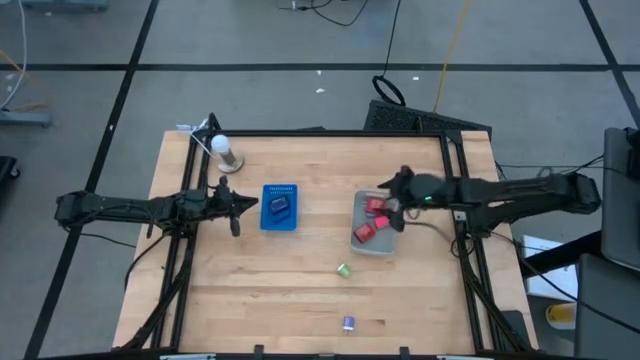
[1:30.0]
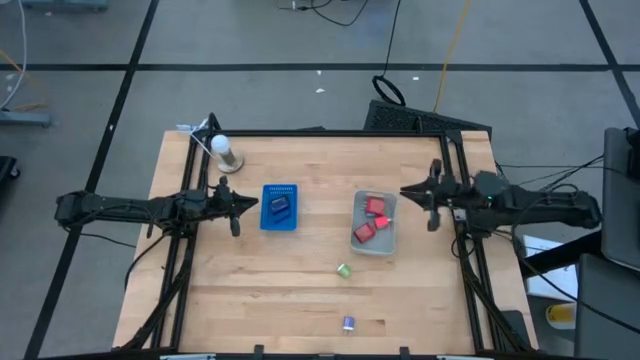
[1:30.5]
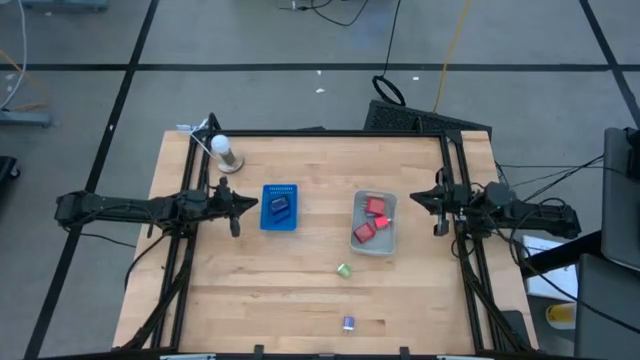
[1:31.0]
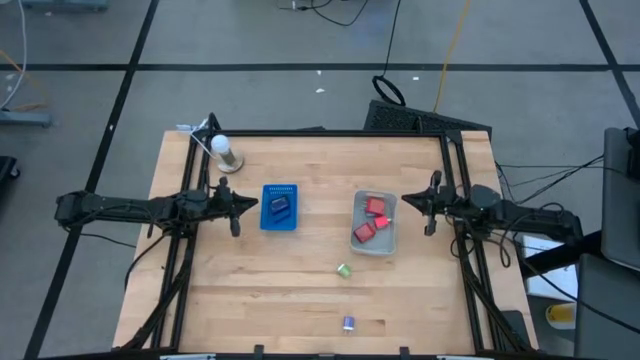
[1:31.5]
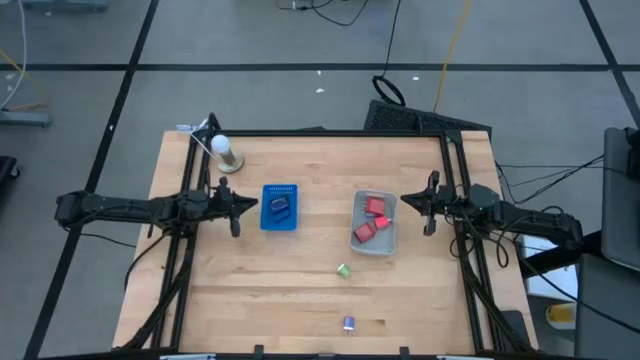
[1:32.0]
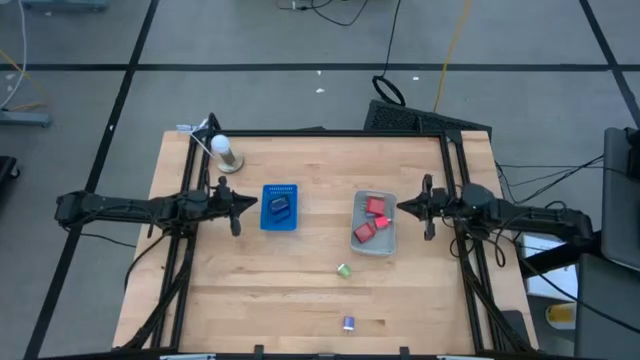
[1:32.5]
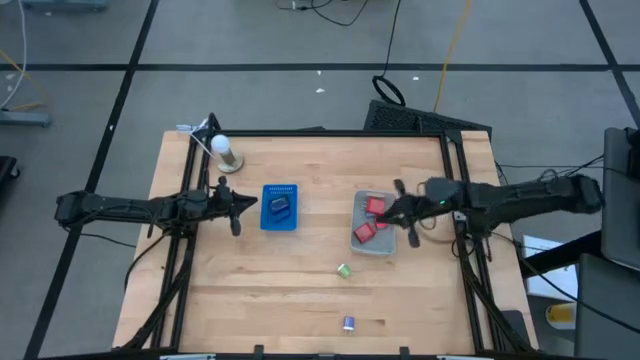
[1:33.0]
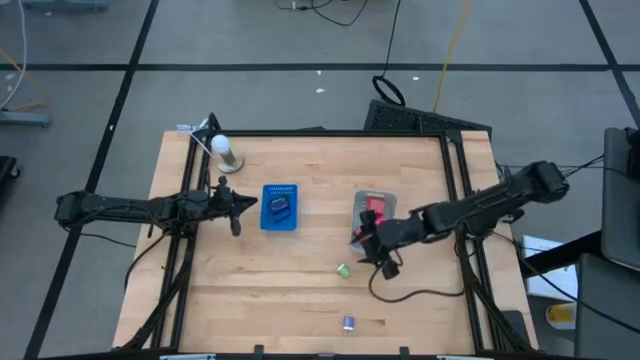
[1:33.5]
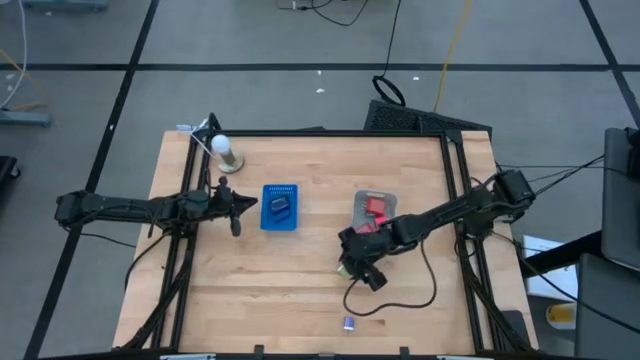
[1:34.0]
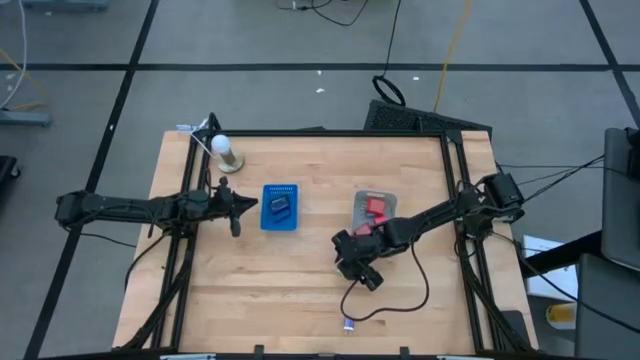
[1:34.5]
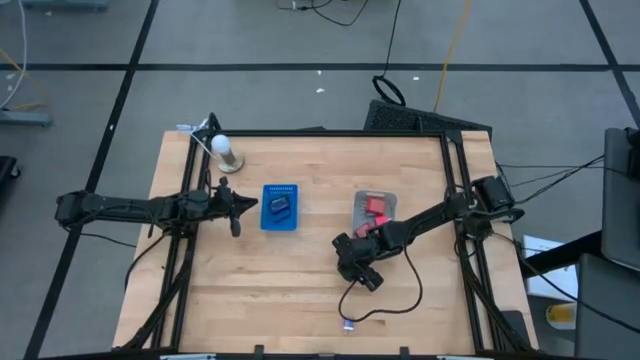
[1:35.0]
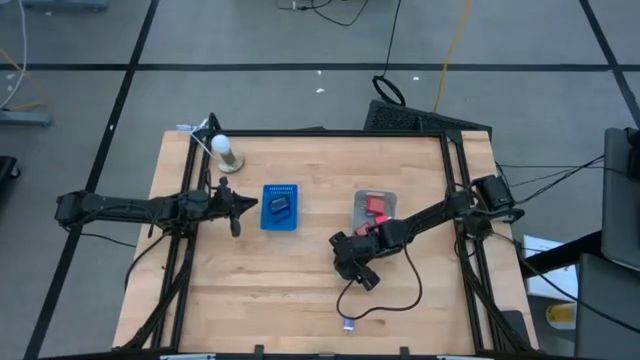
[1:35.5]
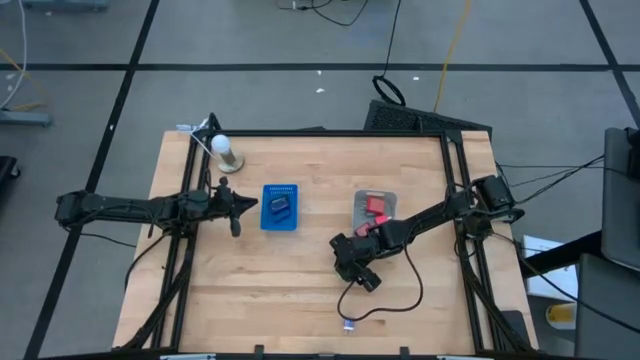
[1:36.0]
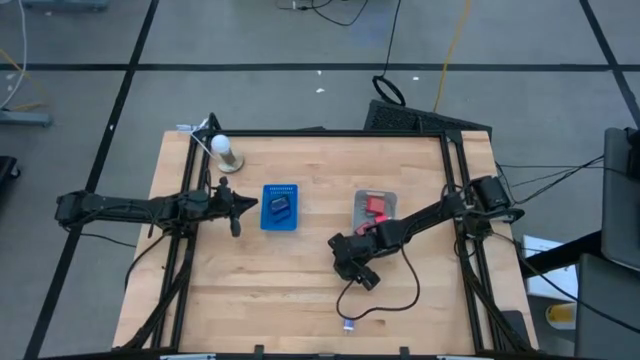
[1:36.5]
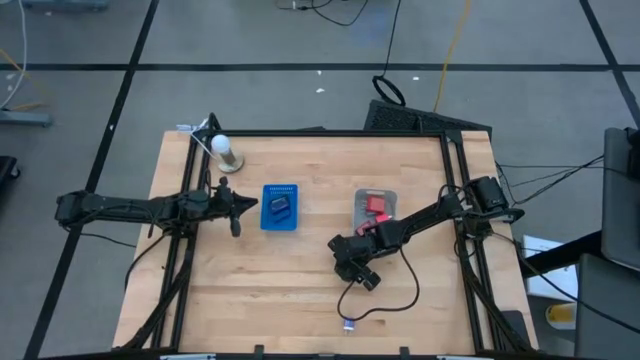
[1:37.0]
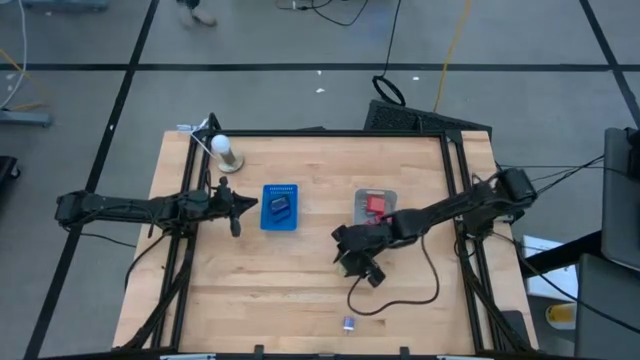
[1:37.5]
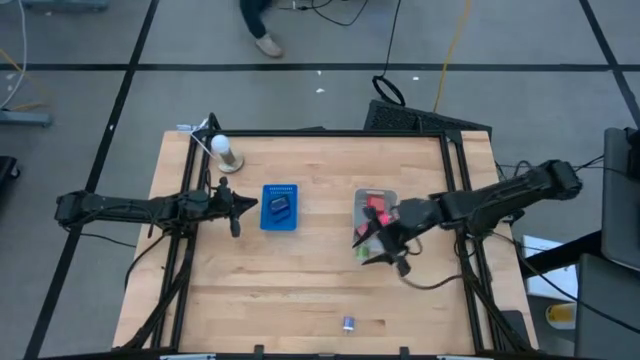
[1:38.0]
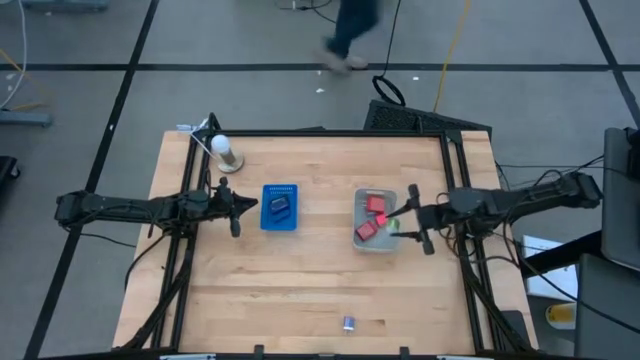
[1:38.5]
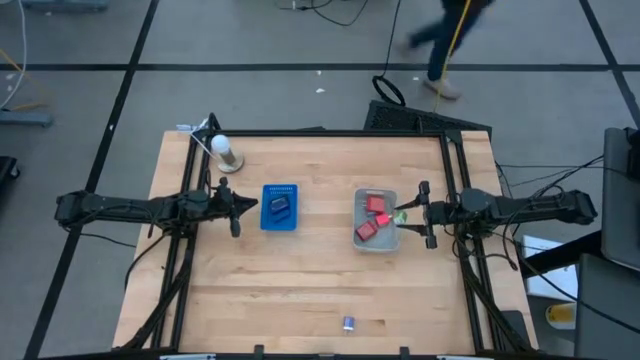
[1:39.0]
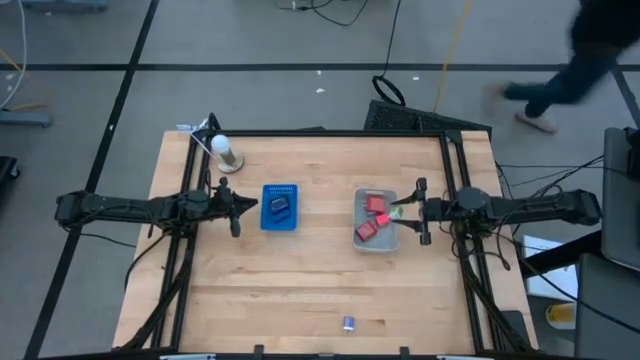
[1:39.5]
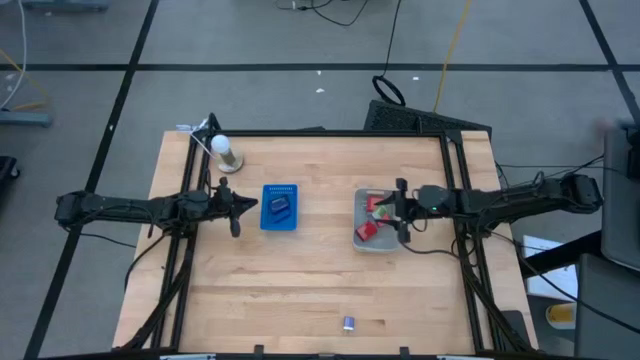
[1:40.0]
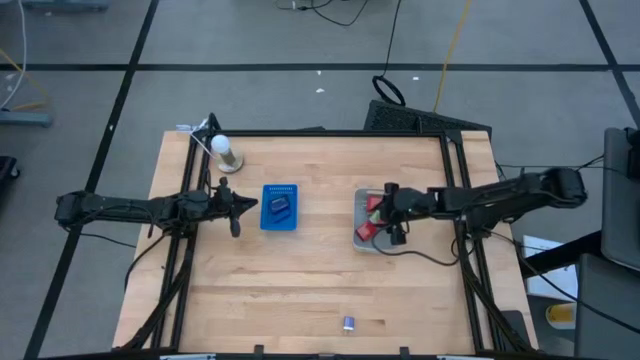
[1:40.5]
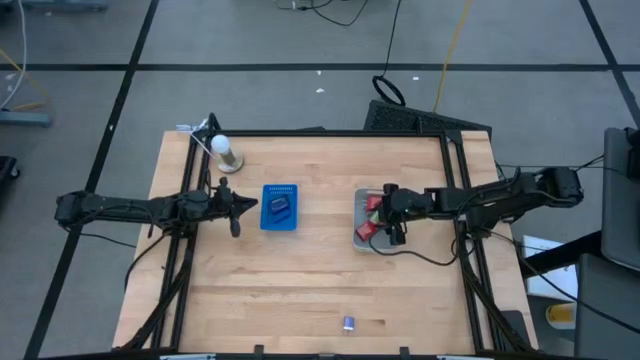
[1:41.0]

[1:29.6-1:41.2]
Task: Pick & Place Office items
Put the green charger adapter into the gray bin

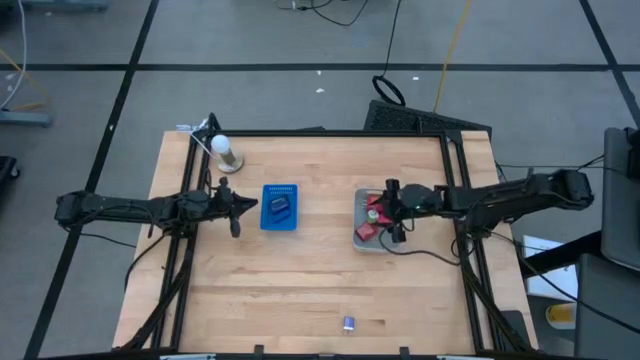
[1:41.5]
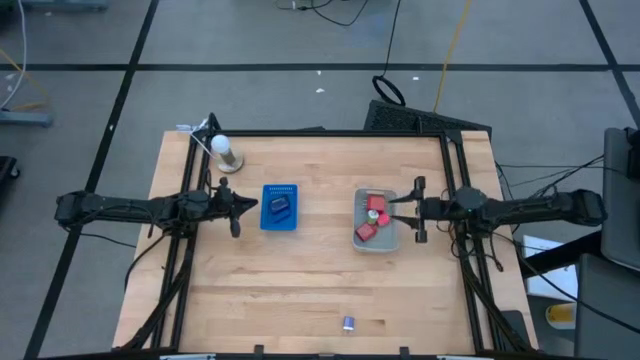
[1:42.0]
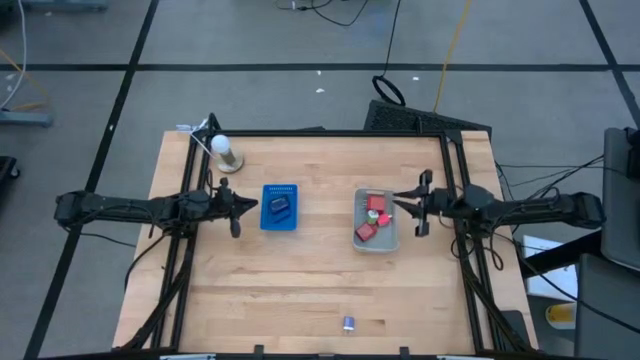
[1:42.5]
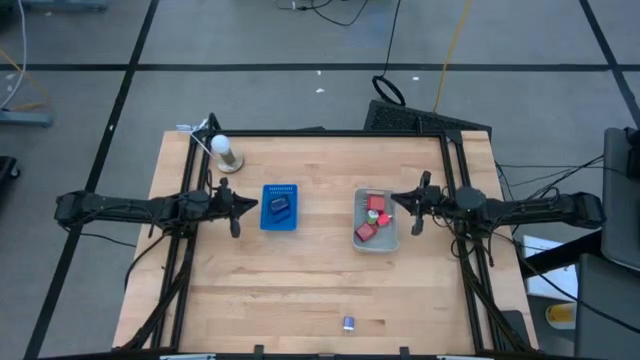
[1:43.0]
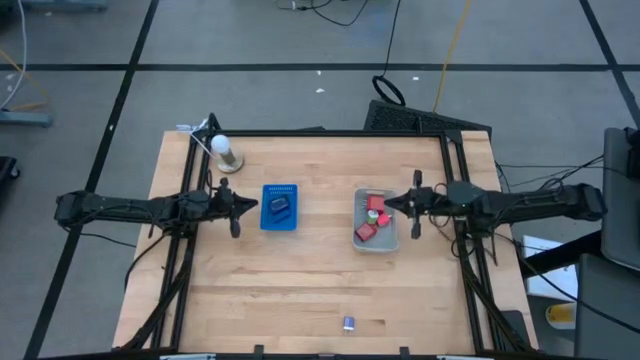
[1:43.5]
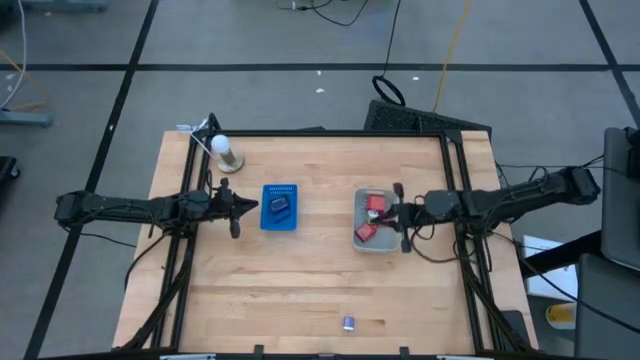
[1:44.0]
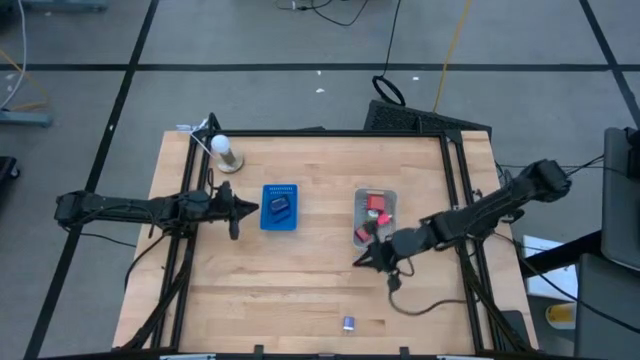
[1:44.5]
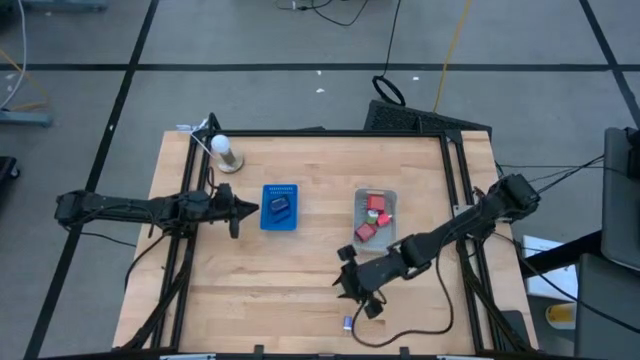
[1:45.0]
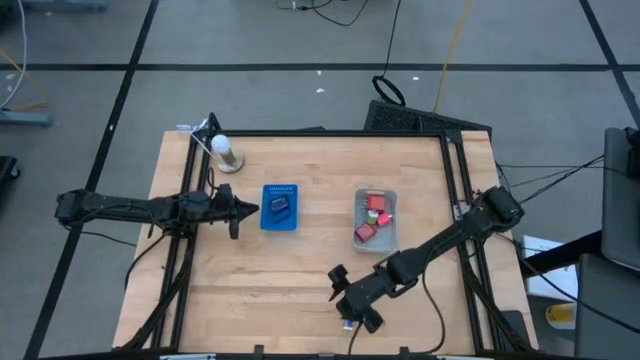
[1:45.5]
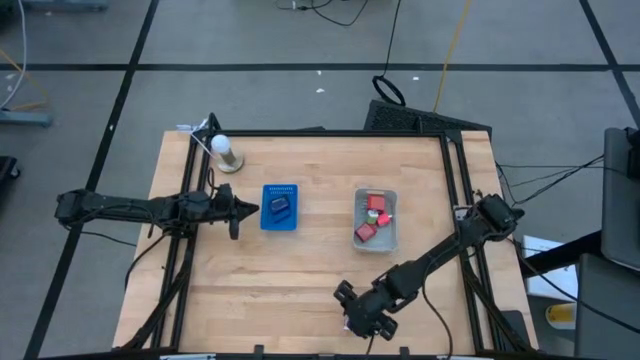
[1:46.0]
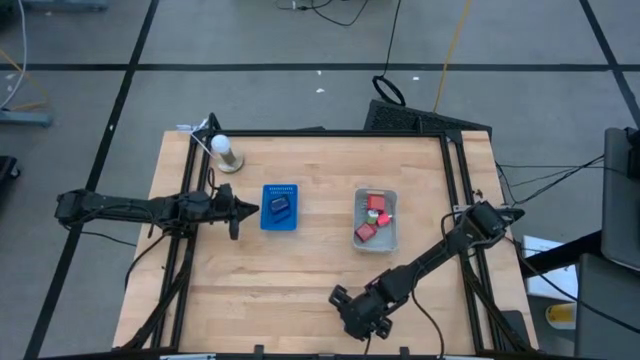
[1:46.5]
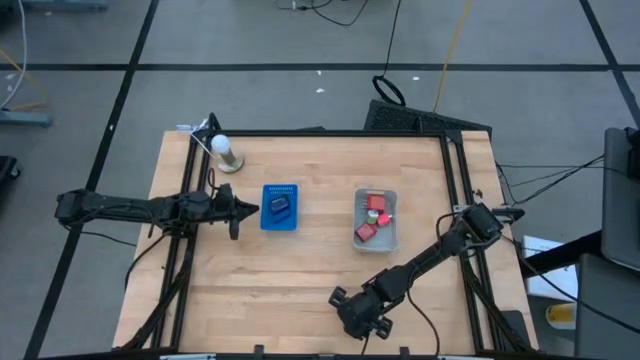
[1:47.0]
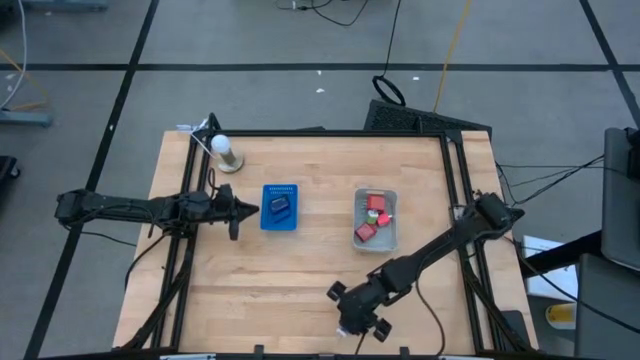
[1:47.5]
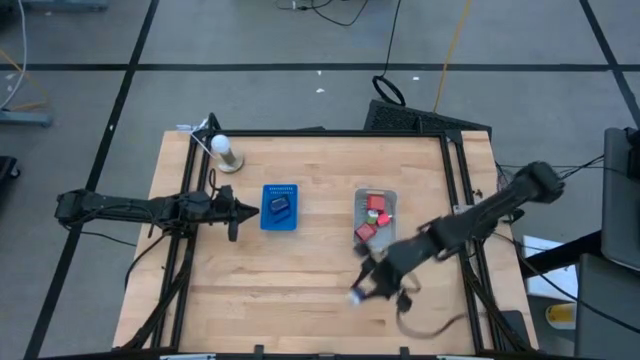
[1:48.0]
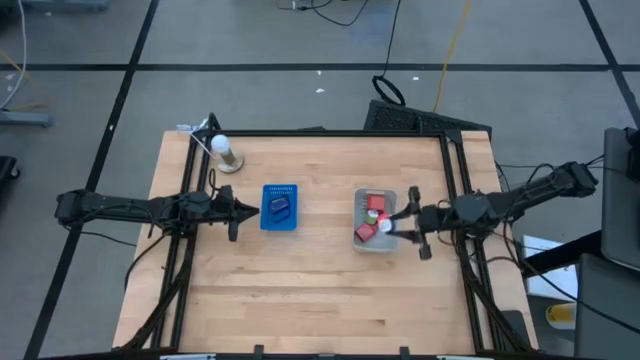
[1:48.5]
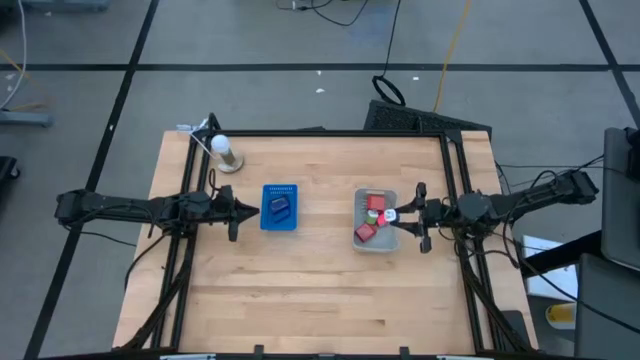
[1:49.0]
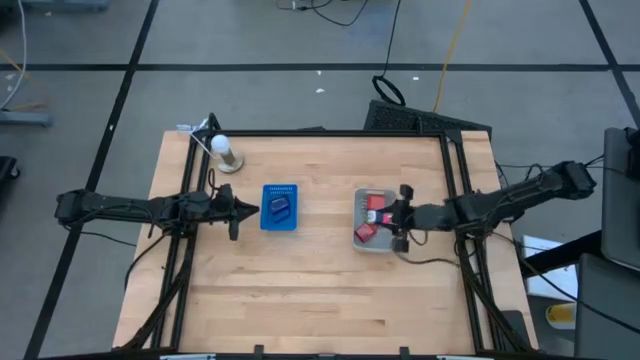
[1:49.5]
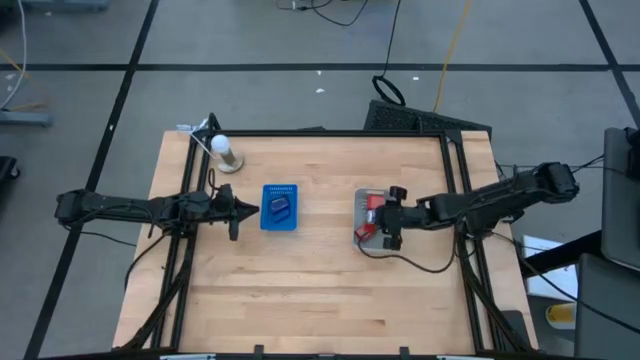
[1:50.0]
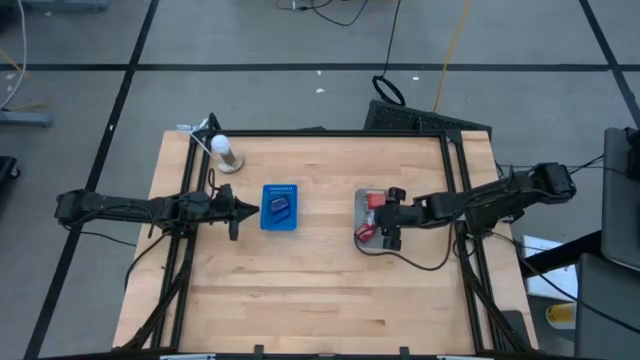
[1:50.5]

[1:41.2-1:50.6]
Put the blue charger adapter into the gray bin

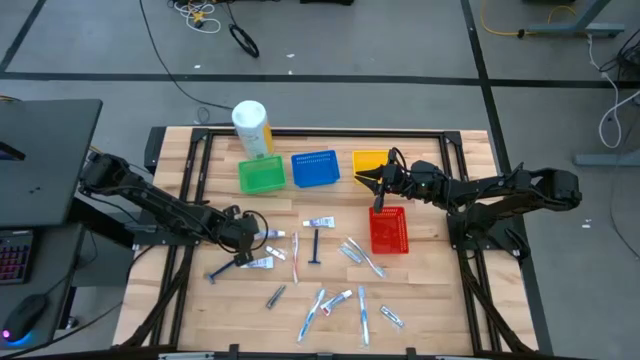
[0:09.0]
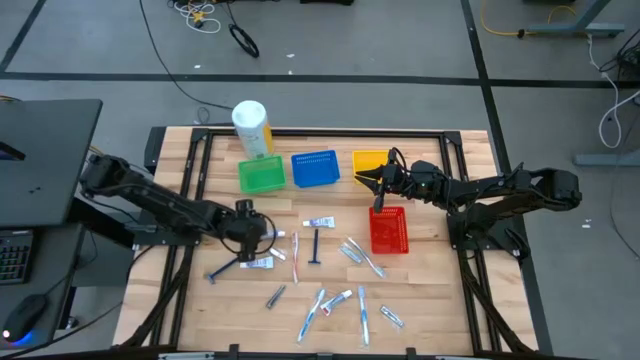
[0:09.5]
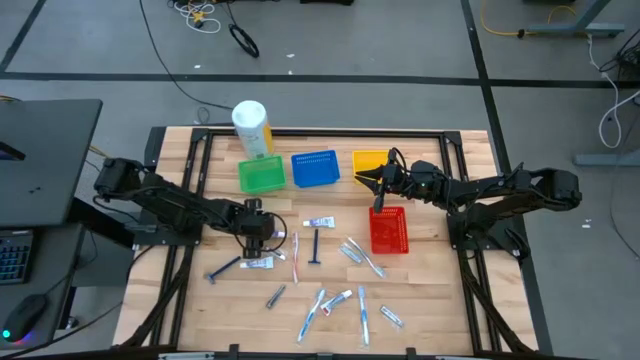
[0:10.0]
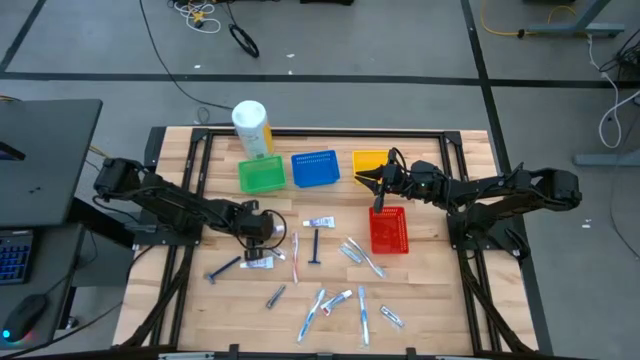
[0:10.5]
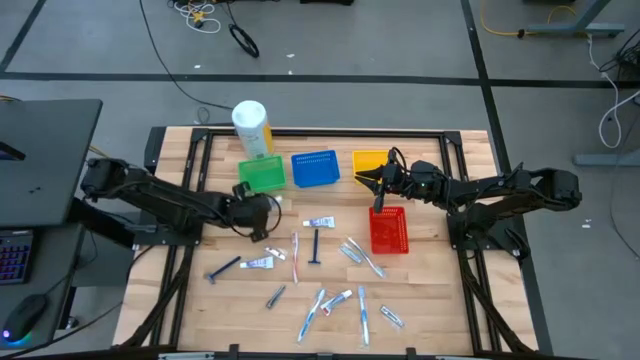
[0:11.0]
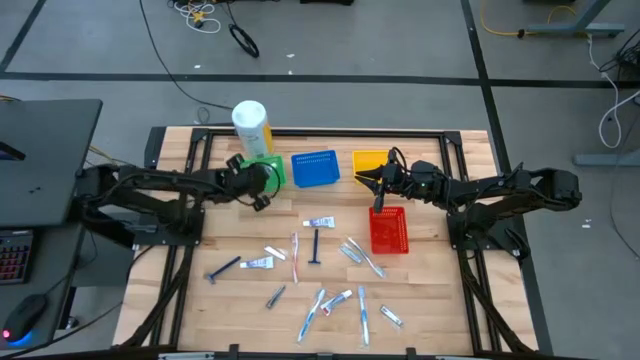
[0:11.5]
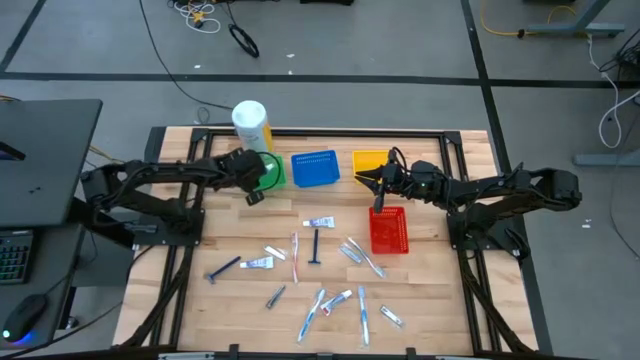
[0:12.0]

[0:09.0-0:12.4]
Task: Pick & Place Travel size toiletries
Put the white toothpaste into the green bin
